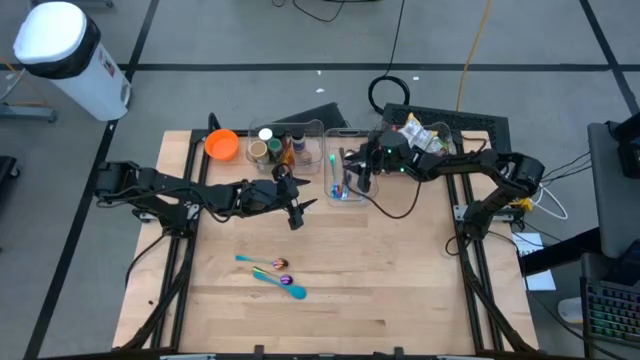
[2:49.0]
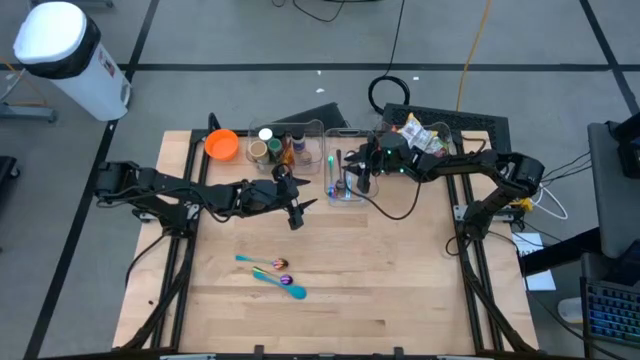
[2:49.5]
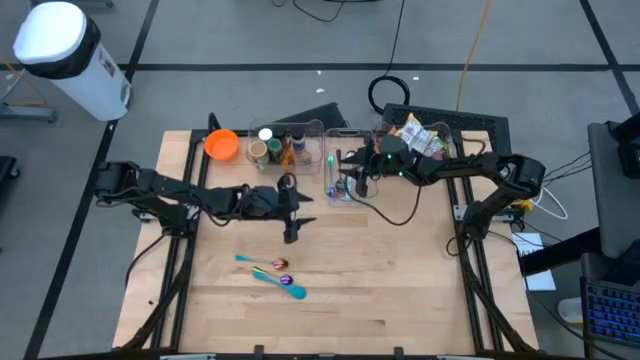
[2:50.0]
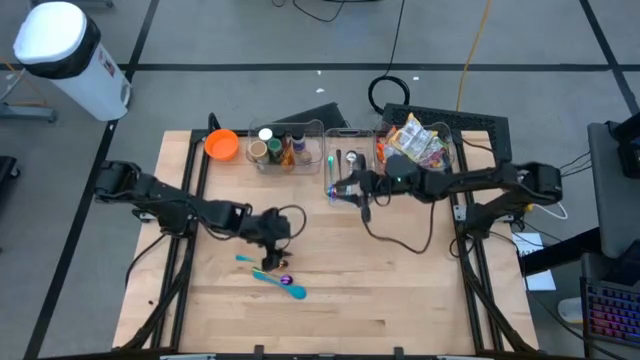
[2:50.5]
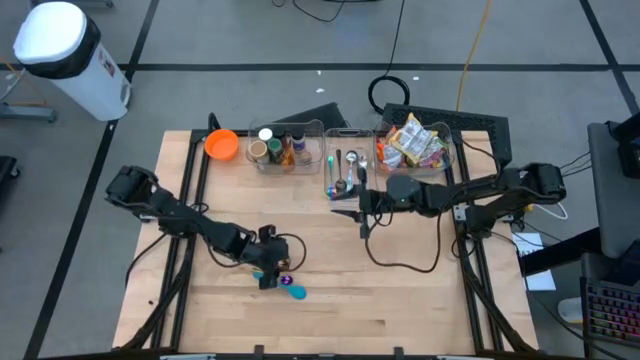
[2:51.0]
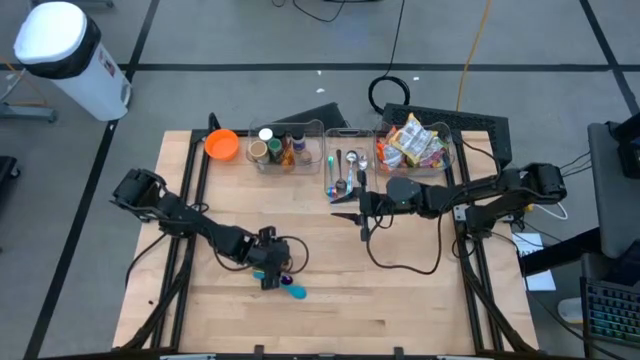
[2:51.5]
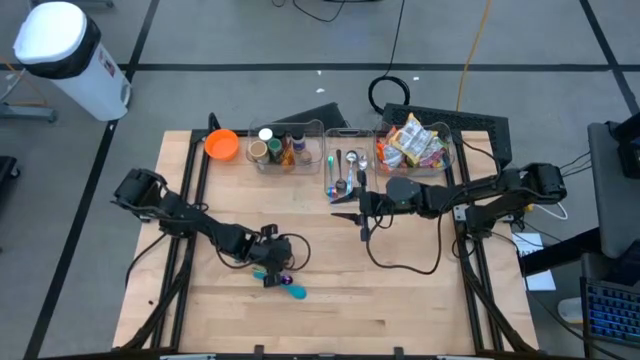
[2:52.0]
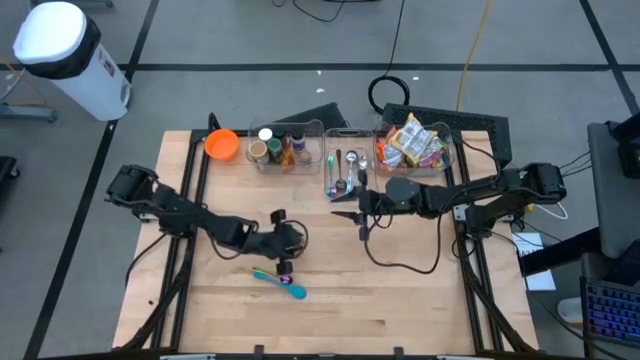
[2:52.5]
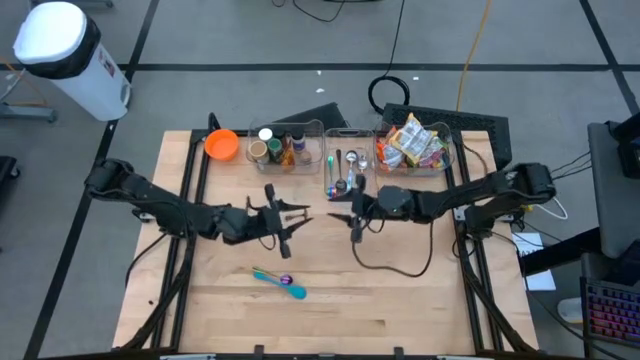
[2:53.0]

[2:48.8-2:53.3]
Task: Pick & Place Food Item
Put the top purple spoon into the center transparent bin

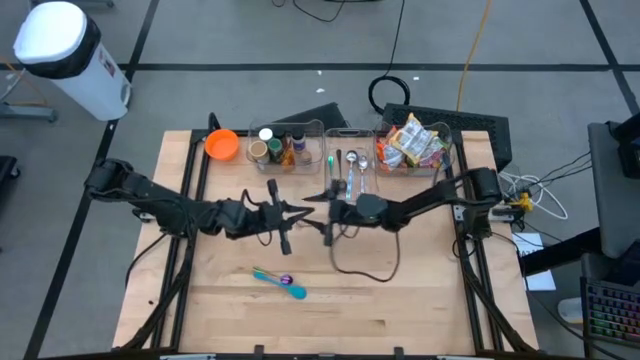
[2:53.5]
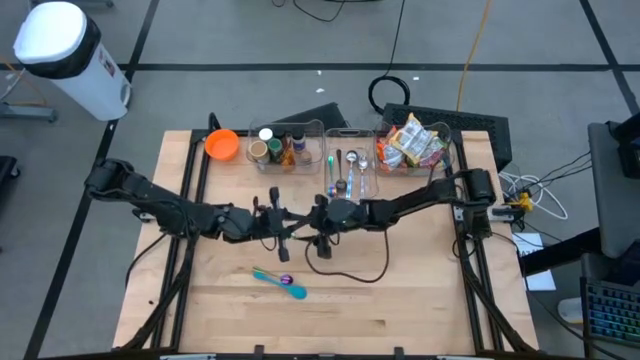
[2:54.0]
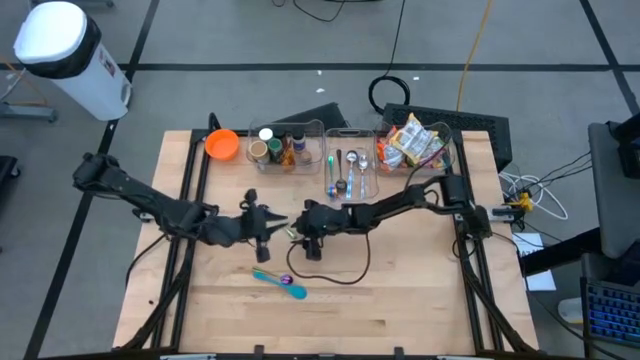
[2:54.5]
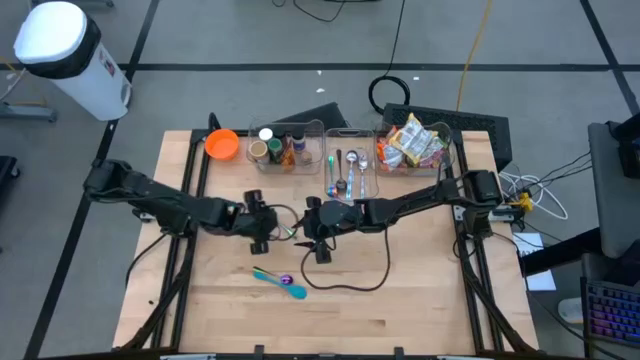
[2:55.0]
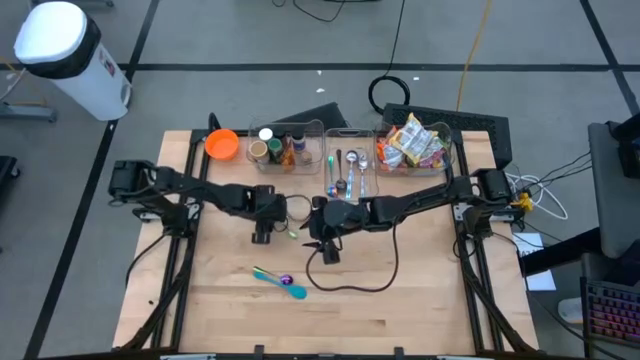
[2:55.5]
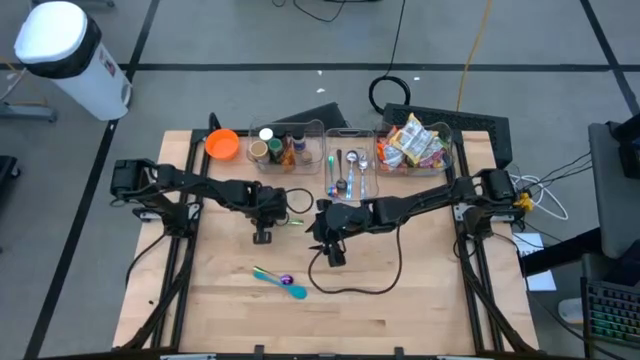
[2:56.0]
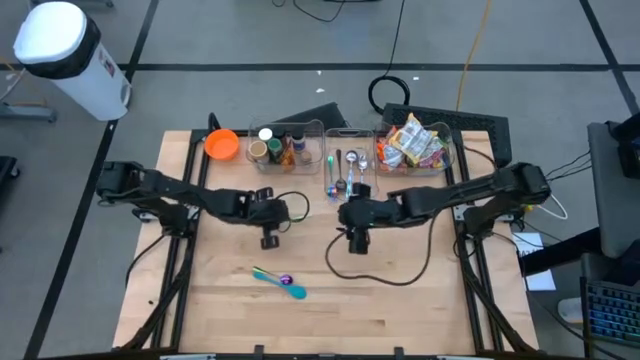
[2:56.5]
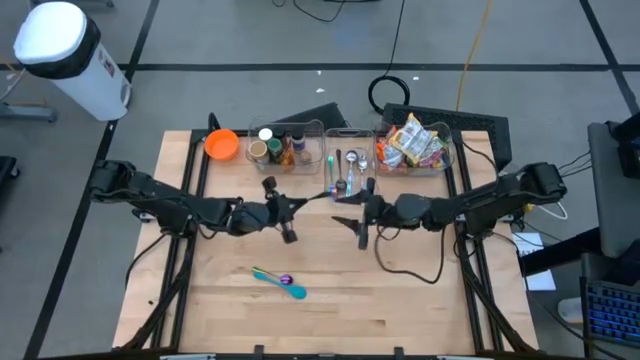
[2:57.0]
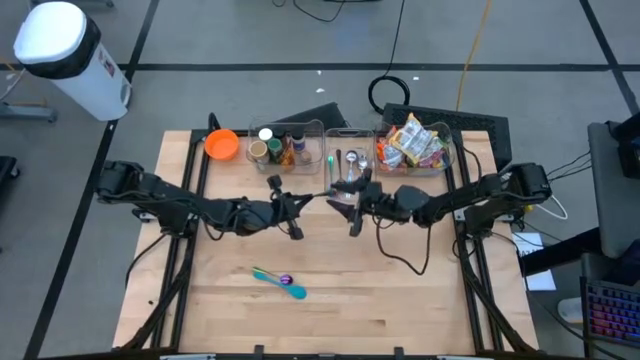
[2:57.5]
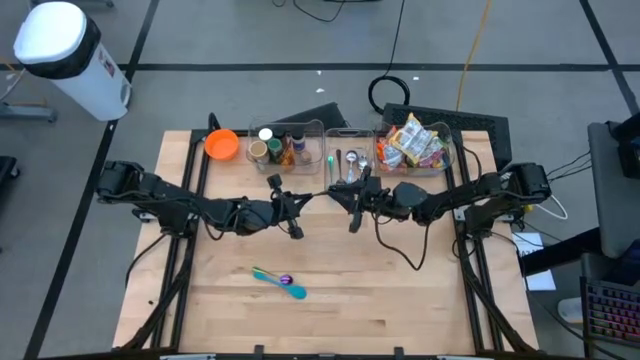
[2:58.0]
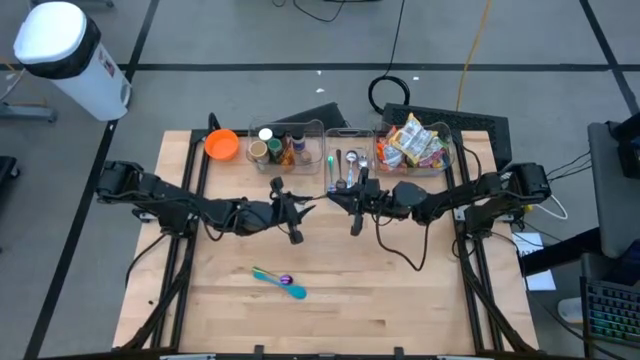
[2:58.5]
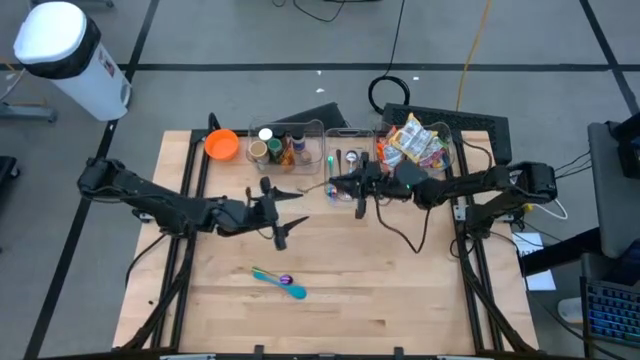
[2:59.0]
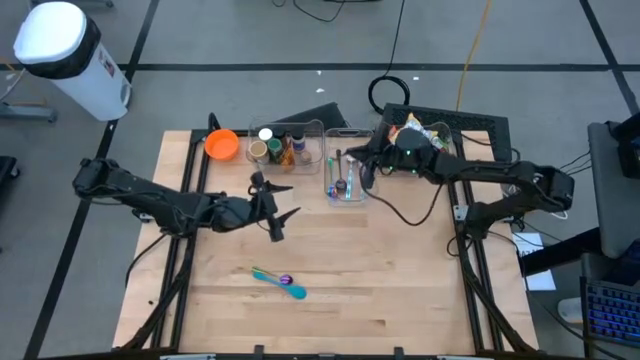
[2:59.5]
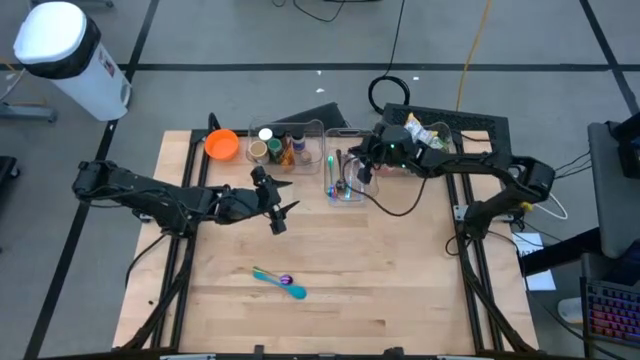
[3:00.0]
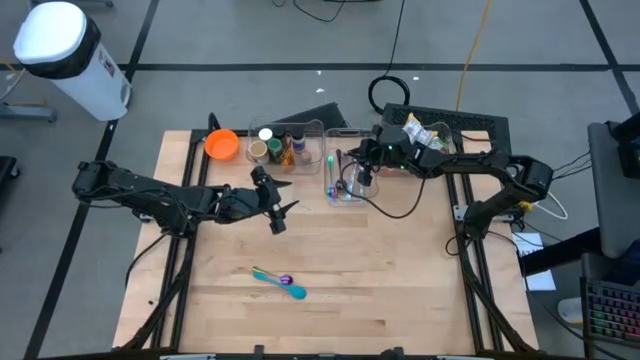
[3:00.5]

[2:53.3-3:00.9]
Put the top purple spoon into the center transparent bin

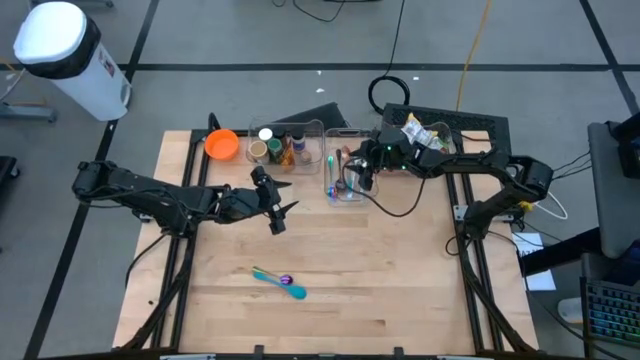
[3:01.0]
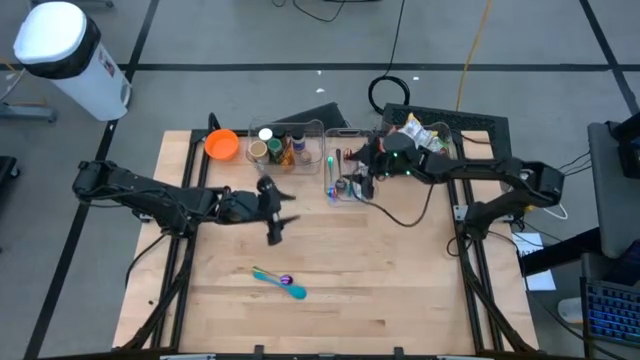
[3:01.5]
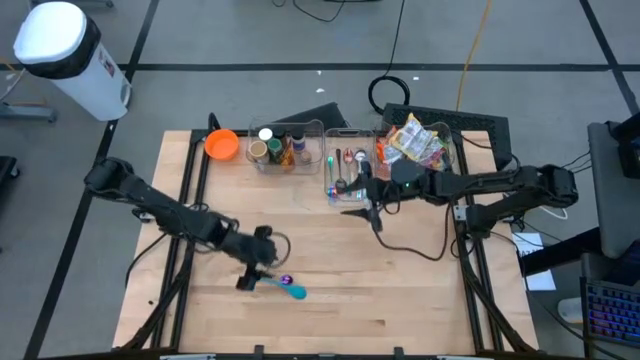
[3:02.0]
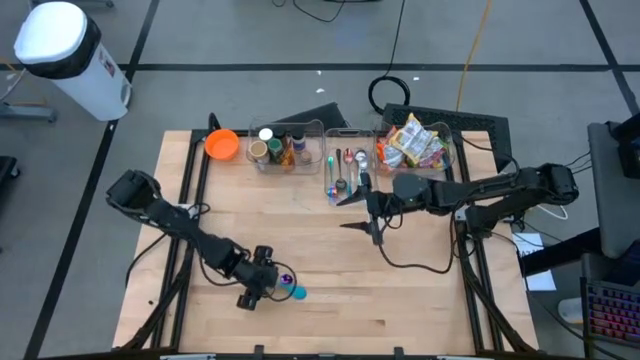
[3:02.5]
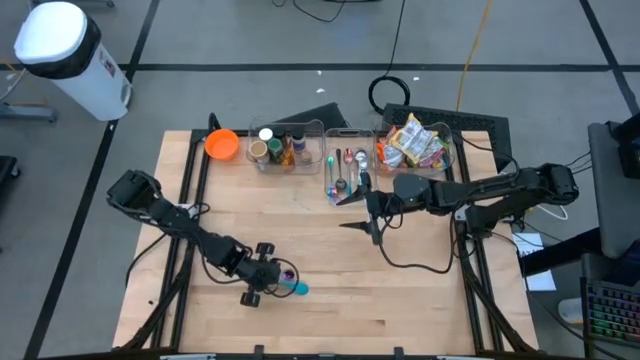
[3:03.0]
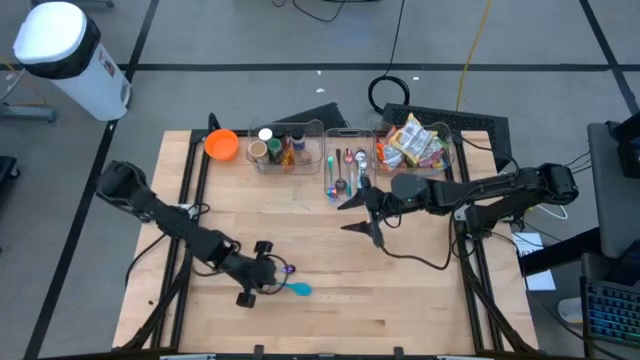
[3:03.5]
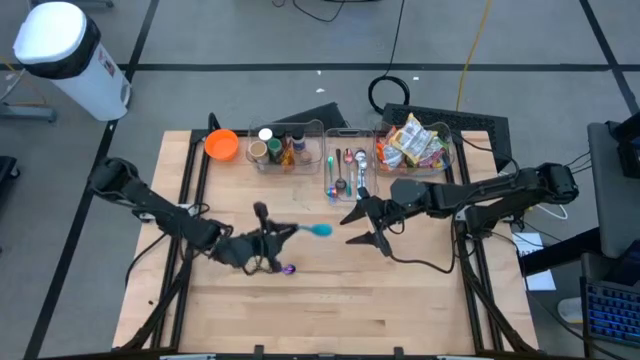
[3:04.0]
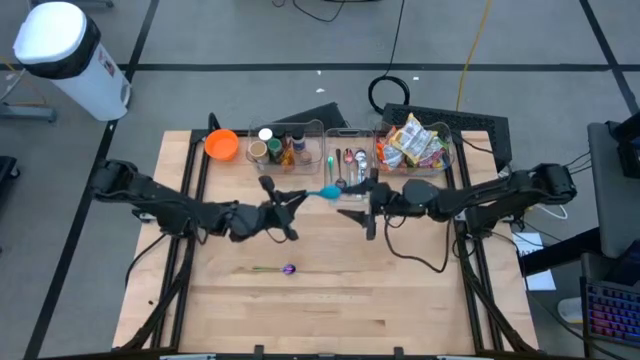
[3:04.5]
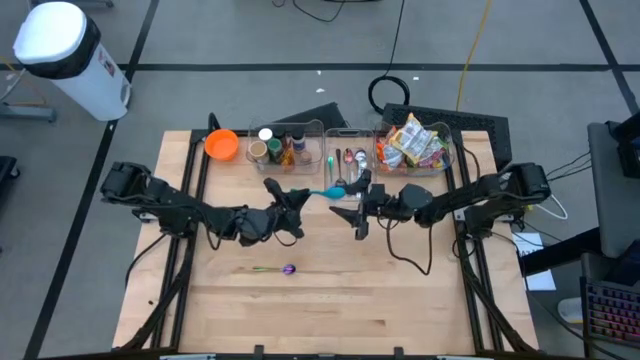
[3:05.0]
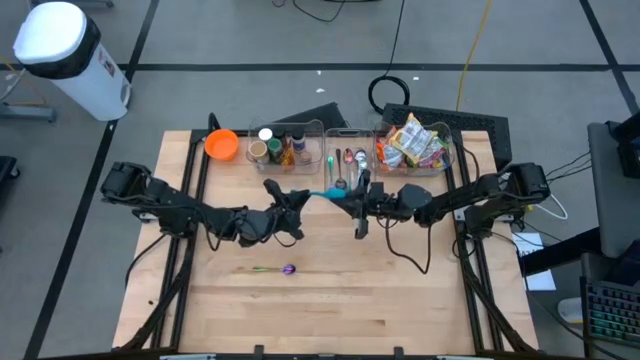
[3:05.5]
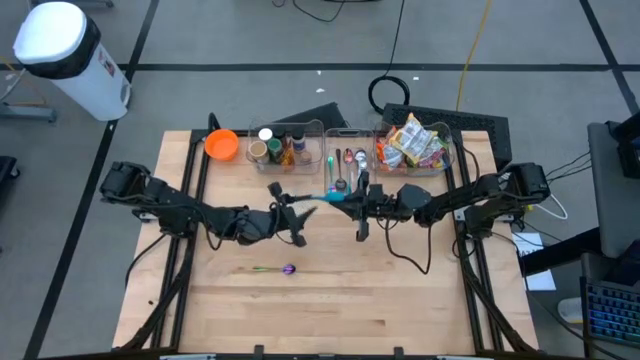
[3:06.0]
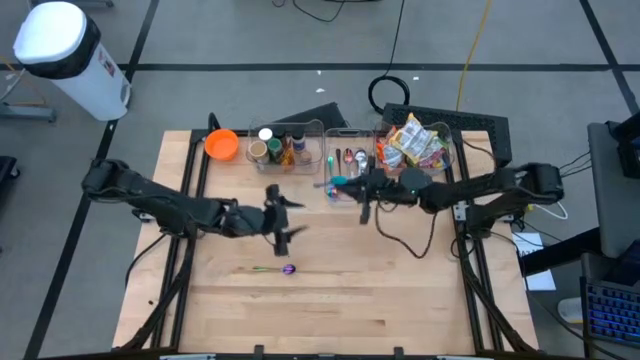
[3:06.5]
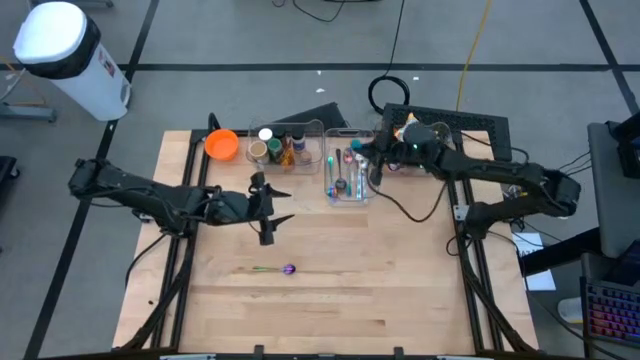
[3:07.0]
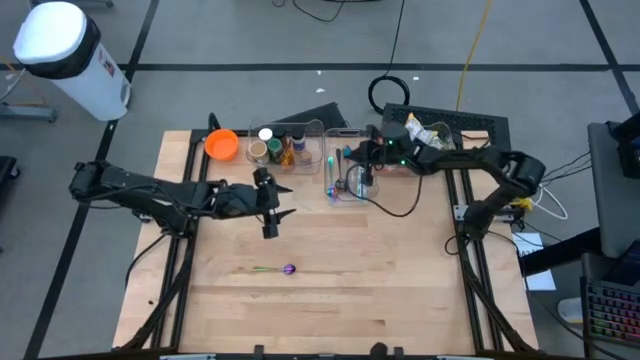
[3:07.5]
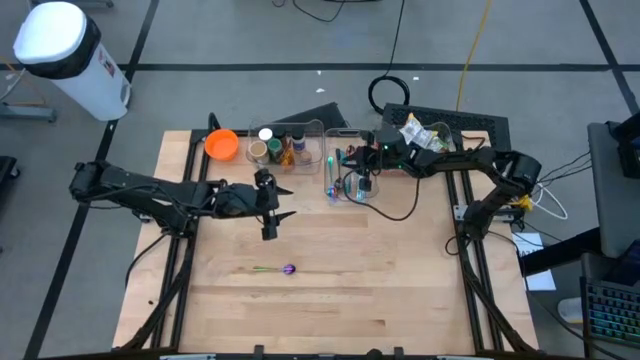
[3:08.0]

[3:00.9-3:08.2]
Put the blue spoon into the center transparent bin

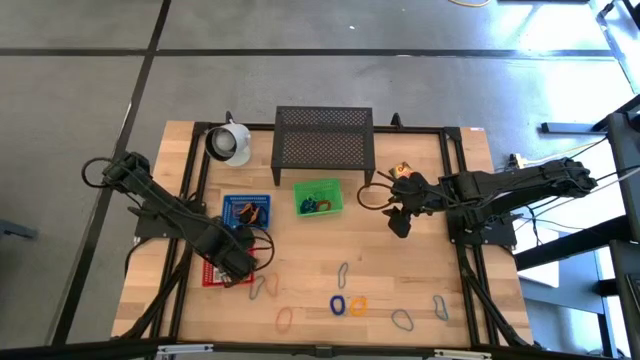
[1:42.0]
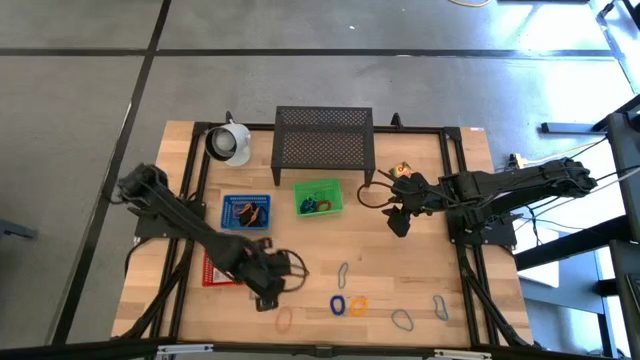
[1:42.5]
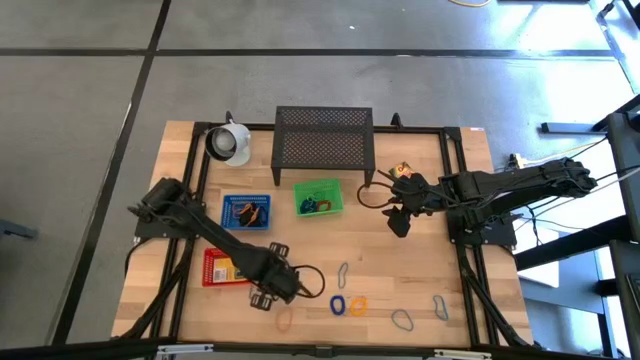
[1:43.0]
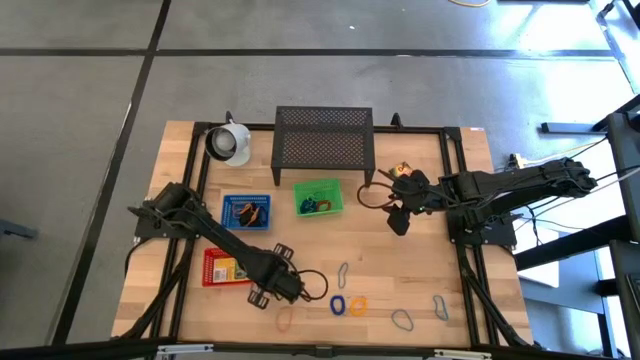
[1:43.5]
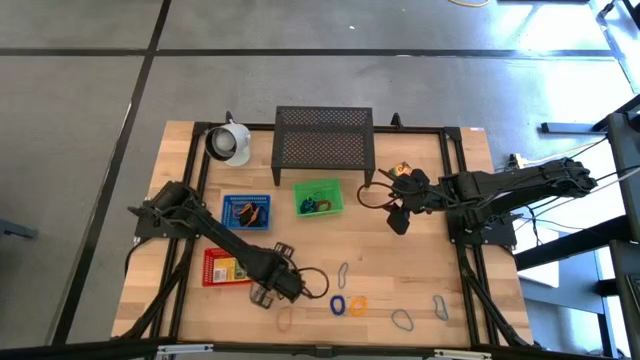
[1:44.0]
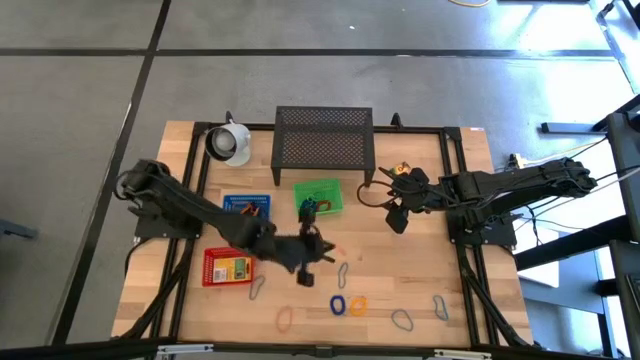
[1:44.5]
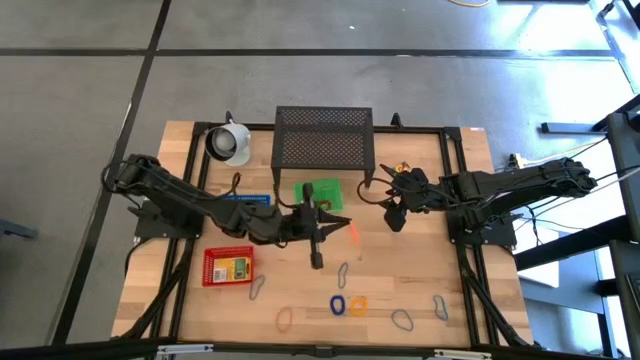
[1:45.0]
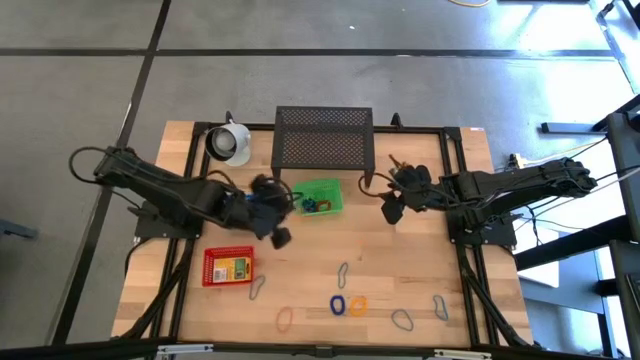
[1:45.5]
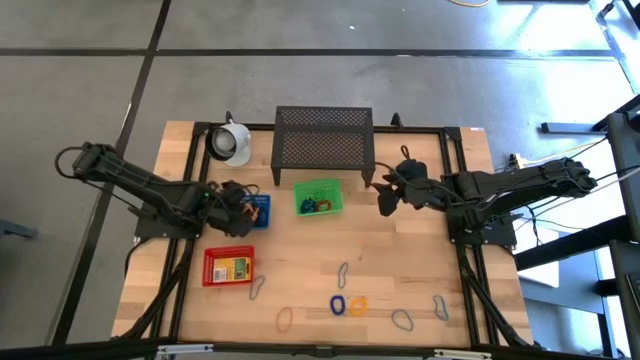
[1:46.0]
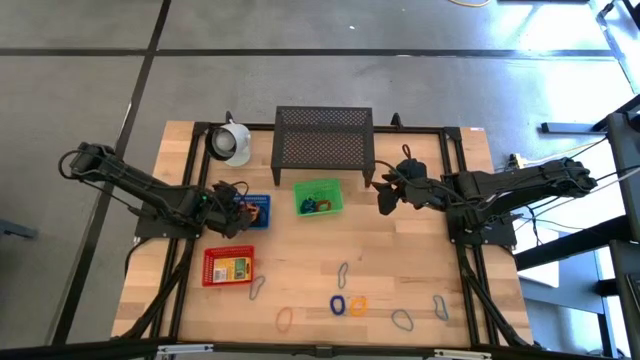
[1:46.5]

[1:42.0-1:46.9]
Task: Pick & Place Office Desk Supplies
Put the orange rubber band into the blue bin
